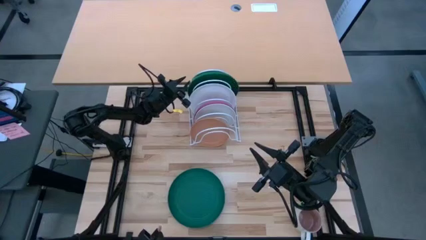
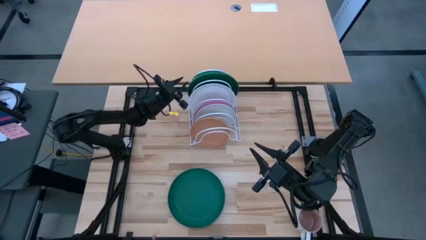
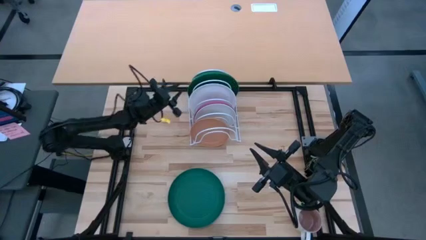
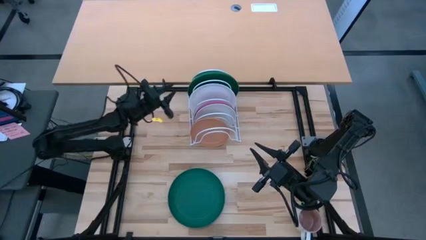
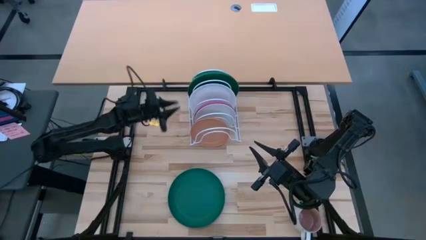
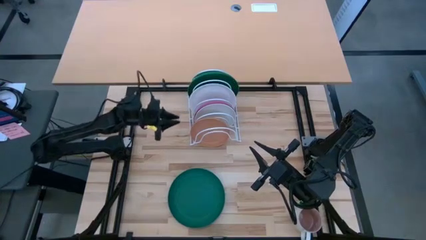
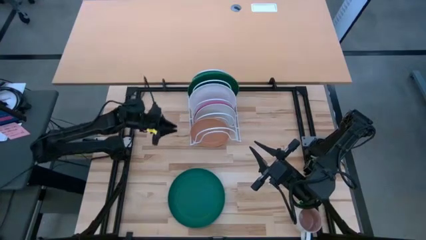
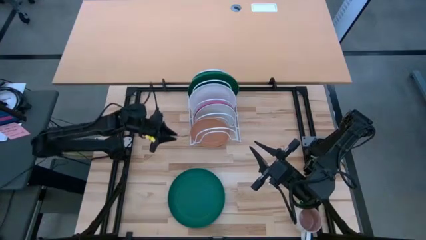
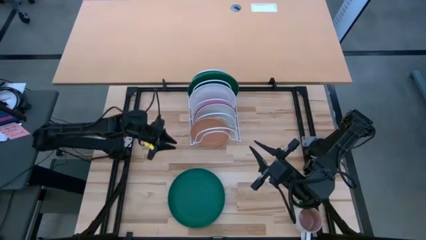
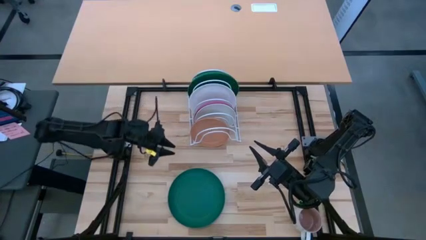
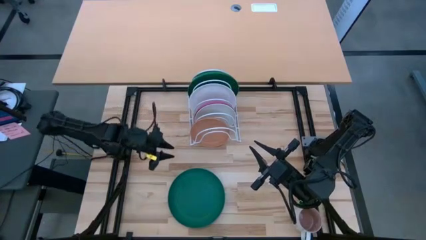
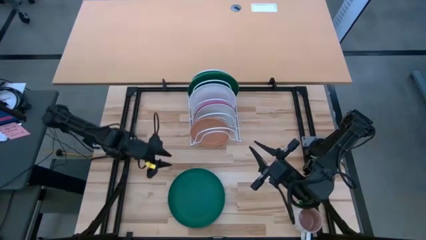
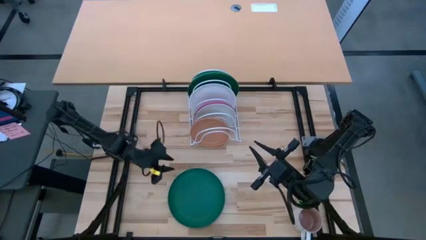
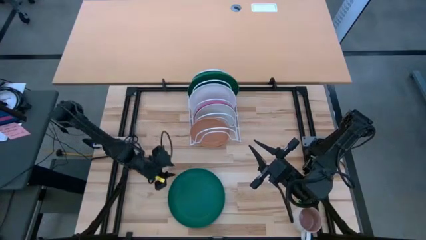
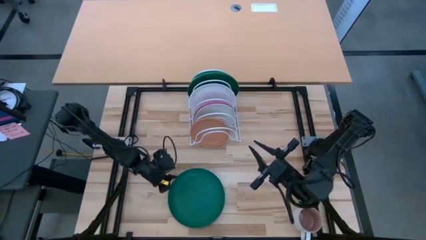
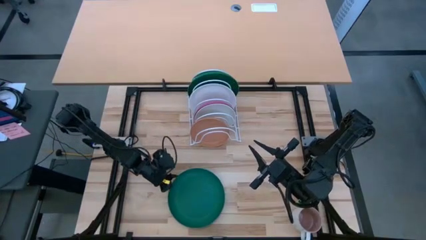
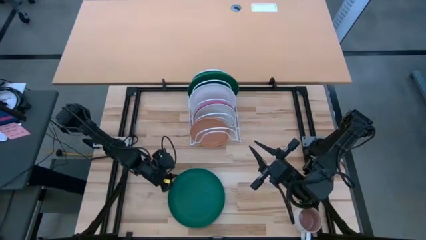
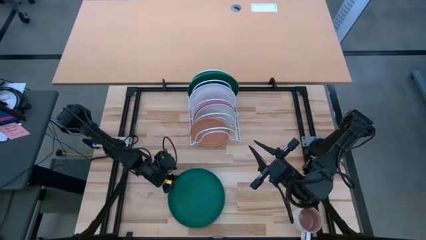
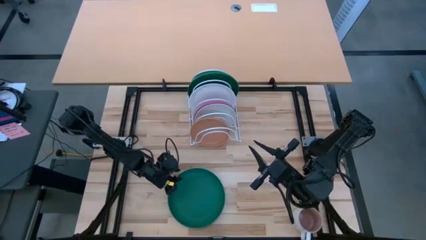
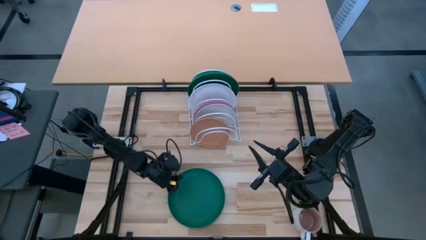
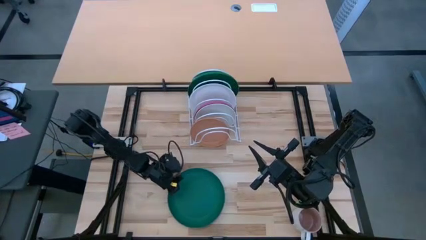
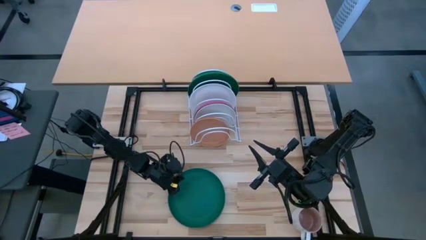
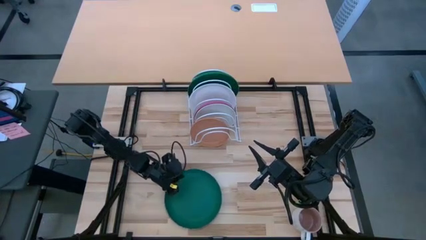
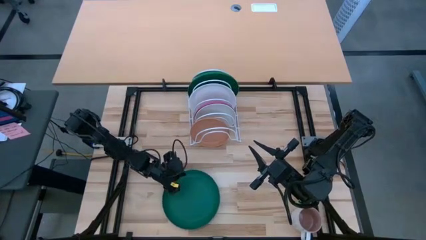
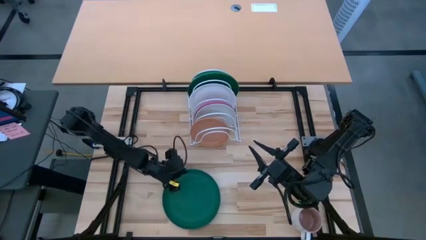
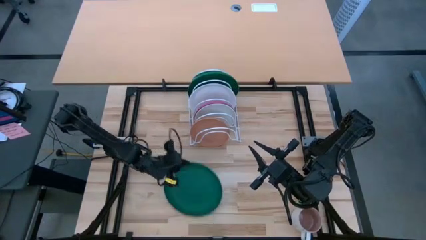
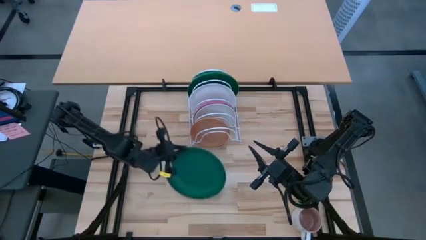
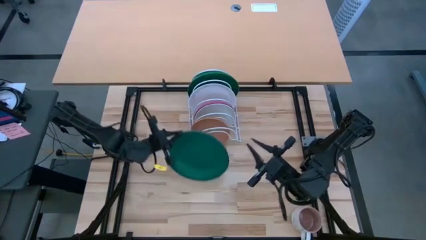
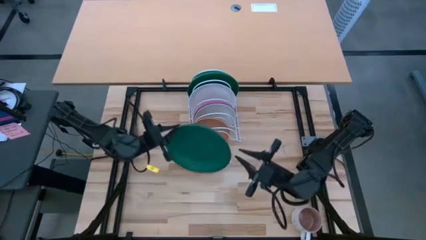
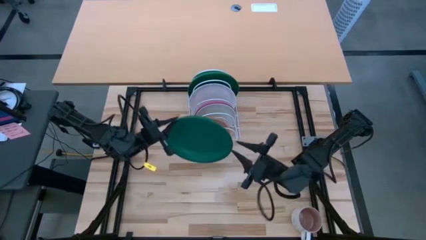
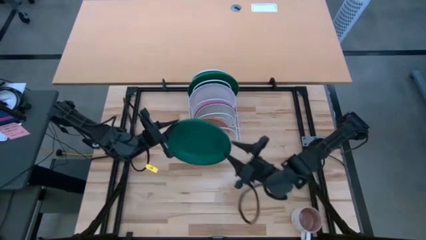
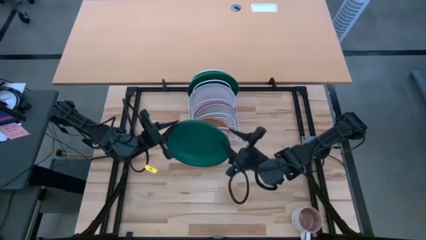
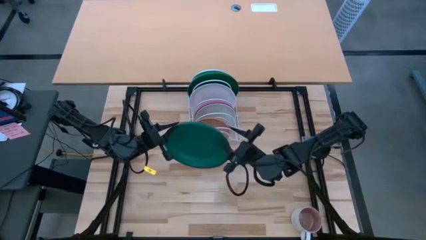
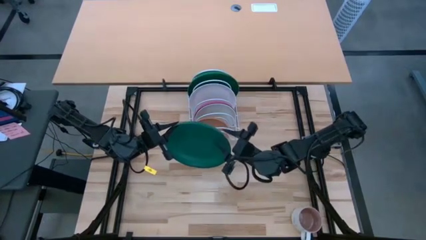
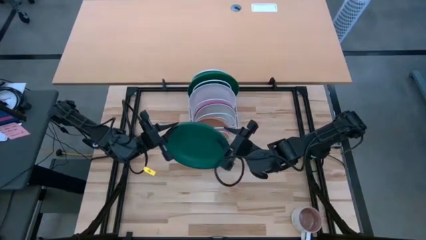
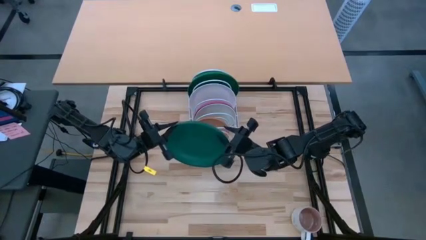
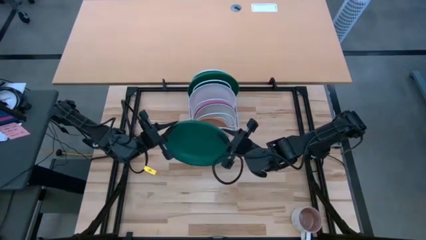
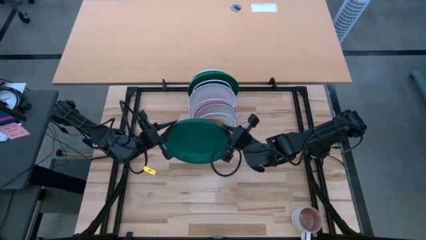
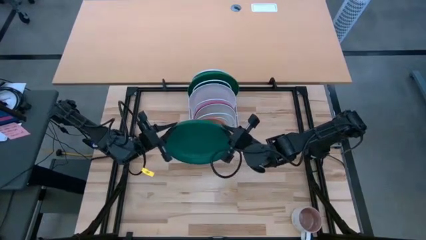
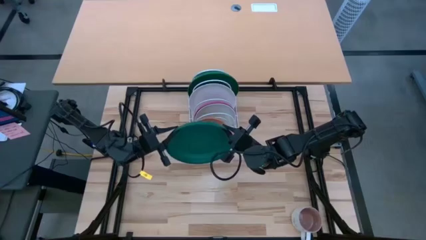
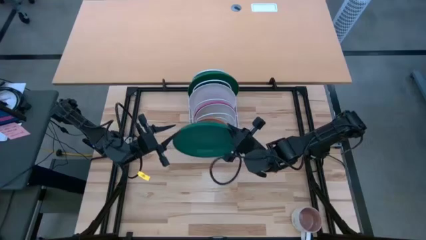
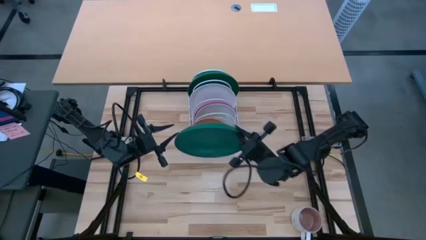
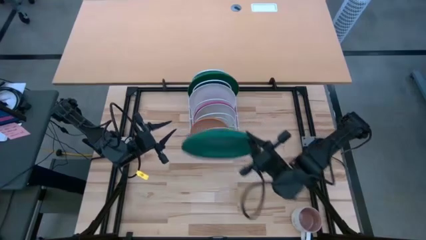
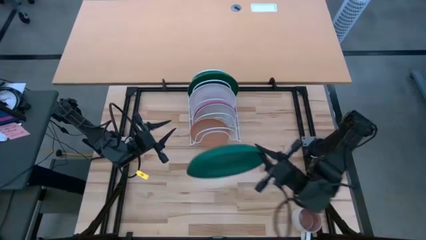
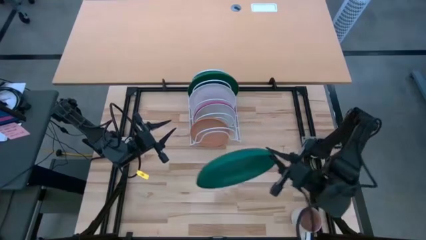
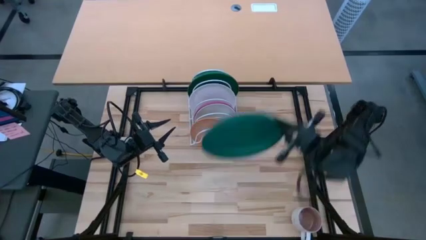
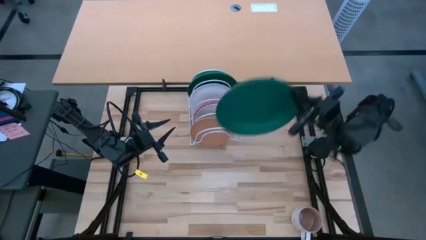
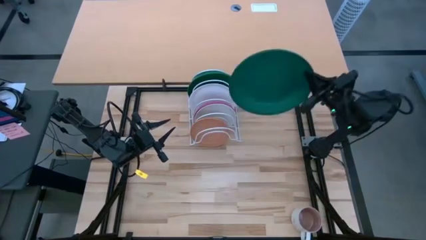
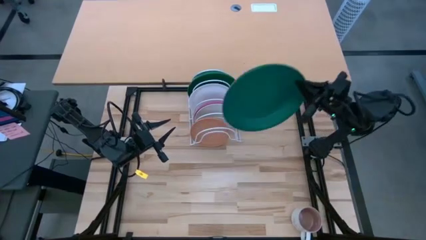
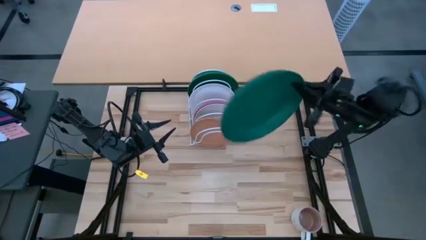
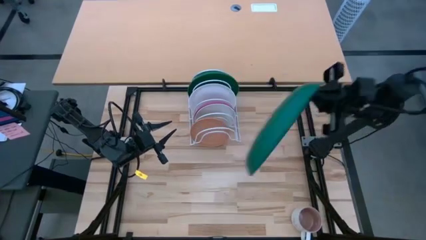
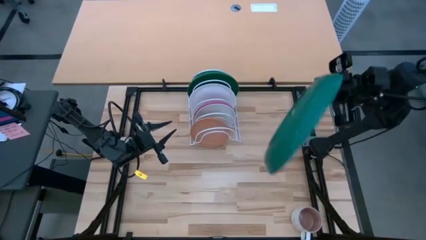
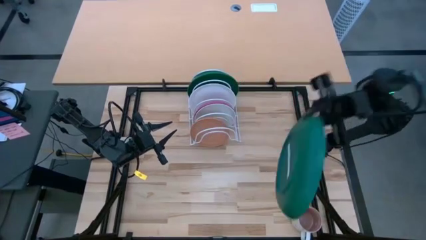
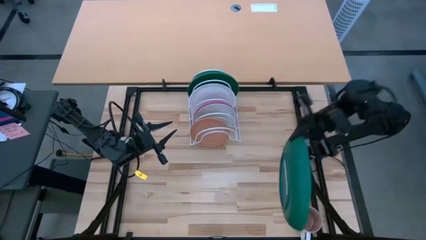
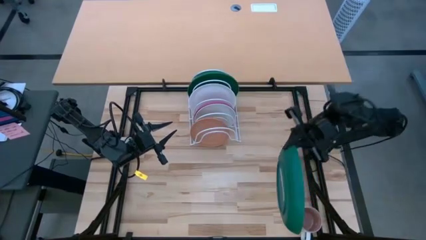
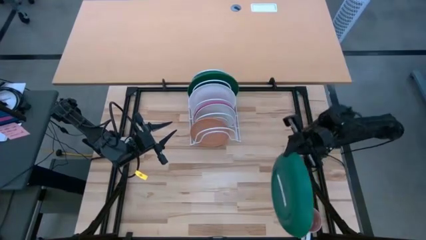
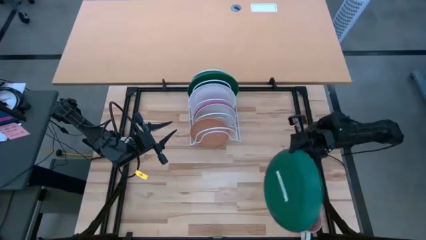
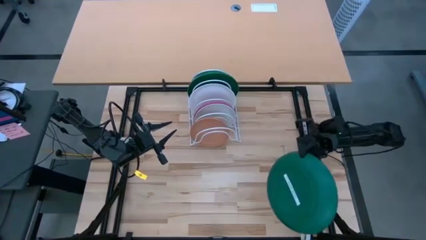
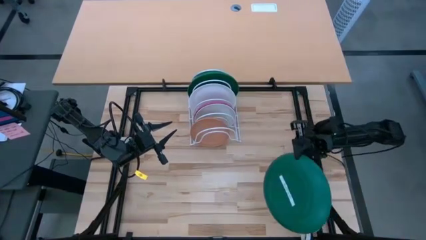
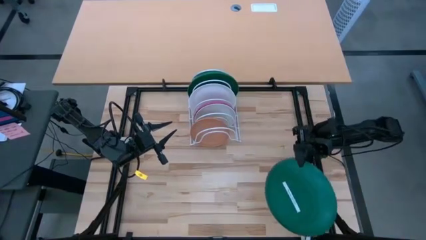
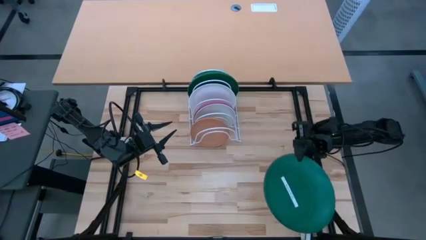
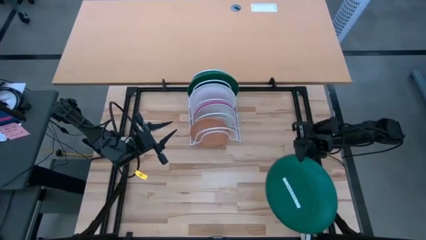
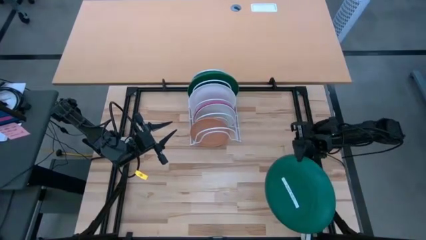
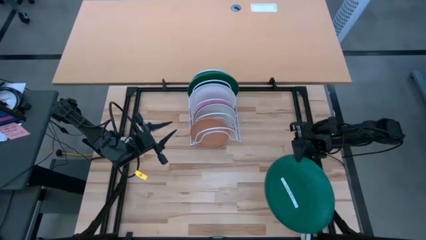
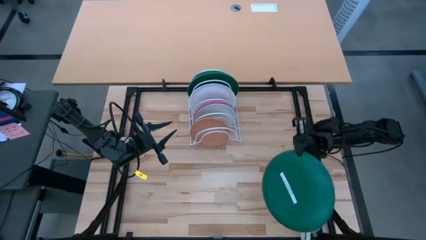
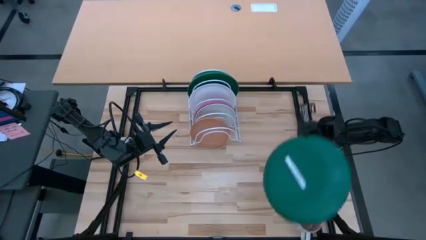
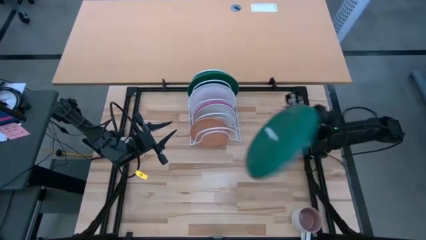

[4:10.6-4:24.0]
Task: Sort dishes
Put the green plate on the dish rack

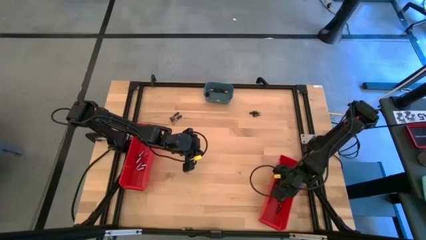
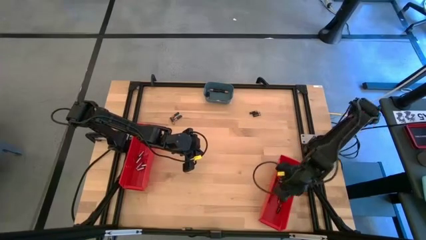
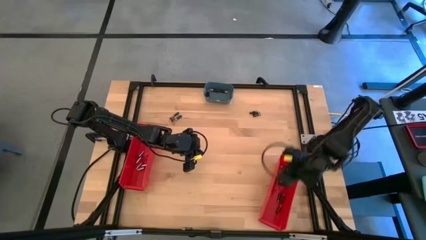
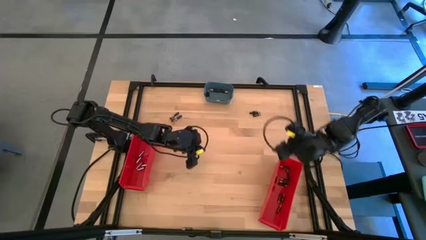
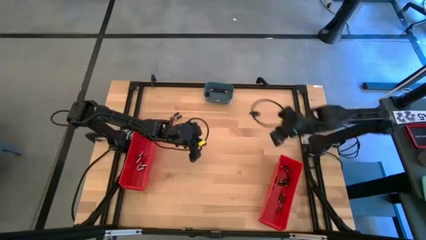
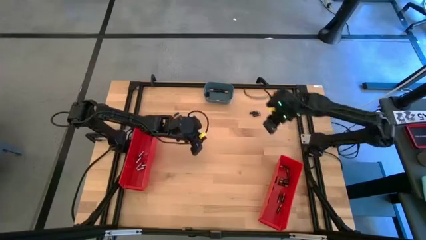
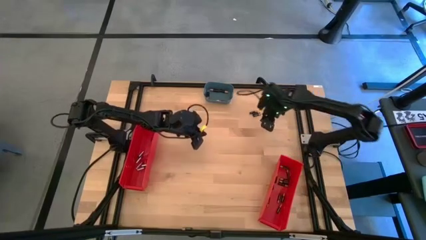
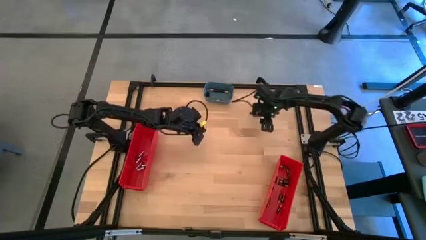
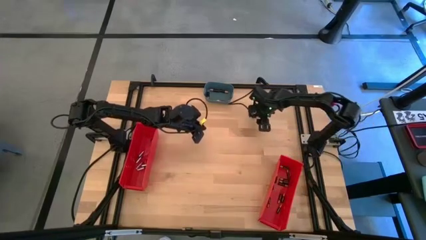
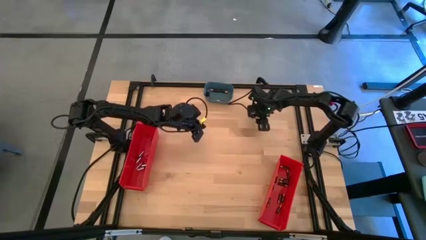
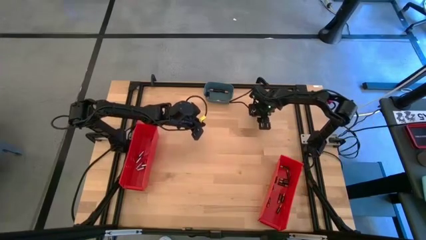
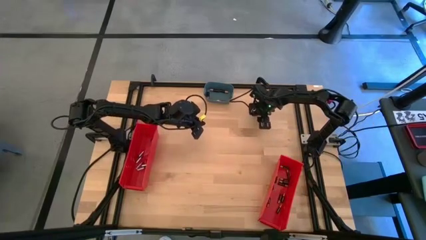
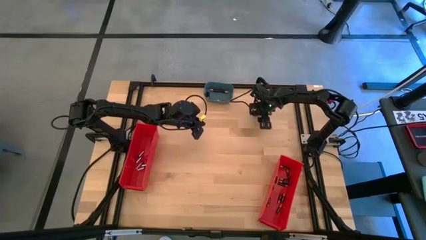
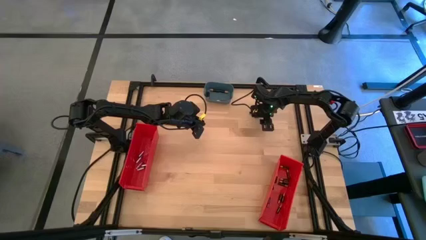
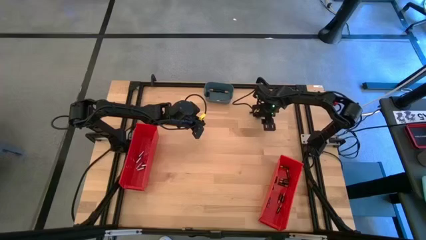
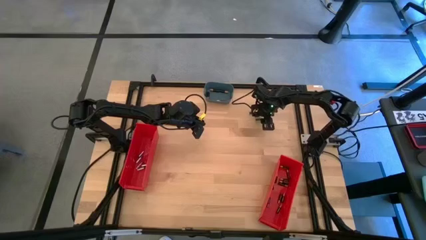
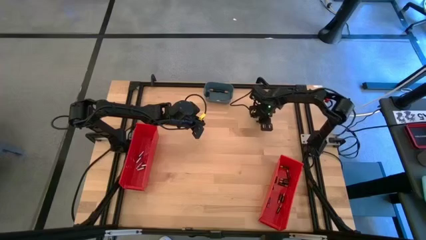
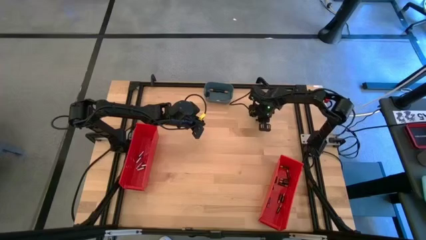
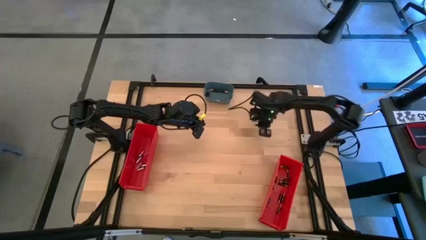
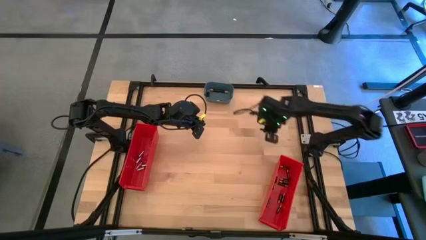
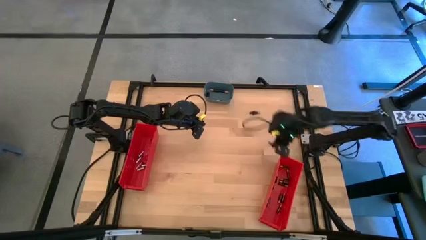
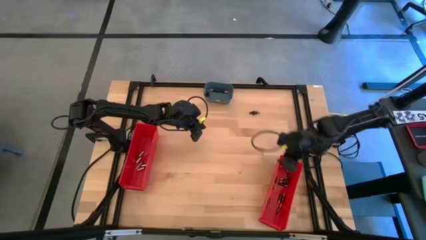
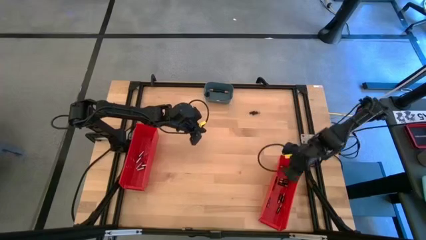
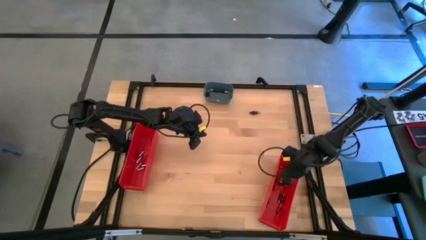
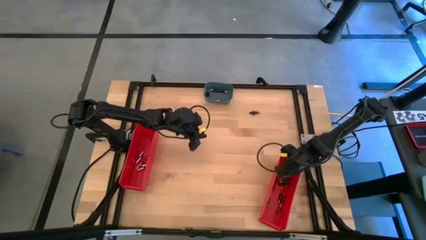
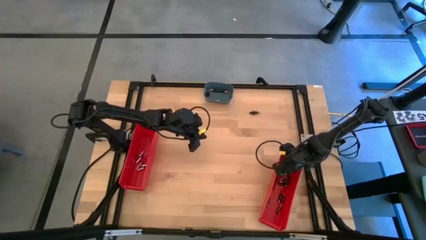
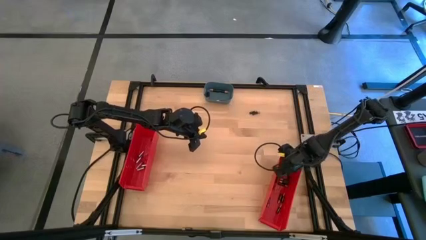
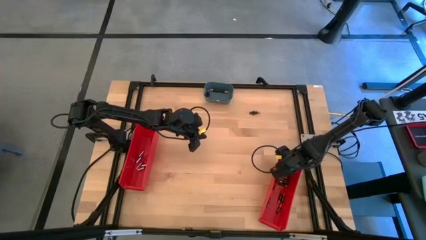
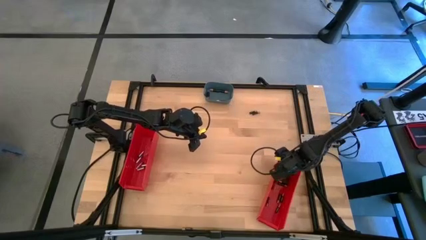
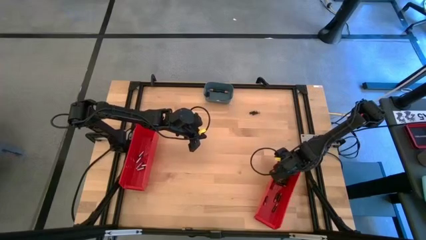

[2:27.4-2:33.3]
Task: Sort batteries
Put the small brown battery into the right red bin
